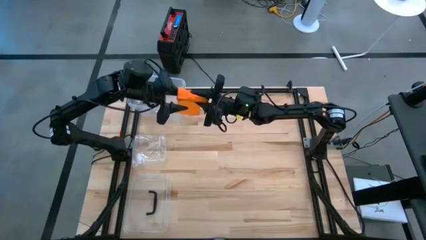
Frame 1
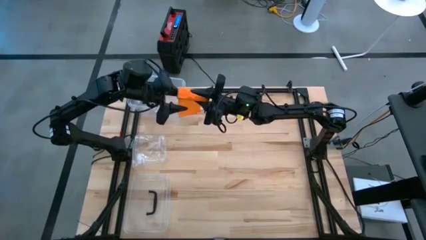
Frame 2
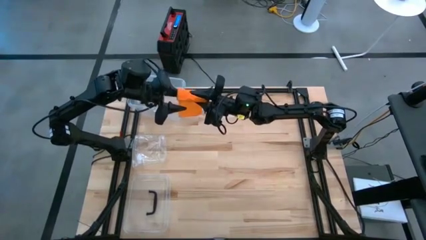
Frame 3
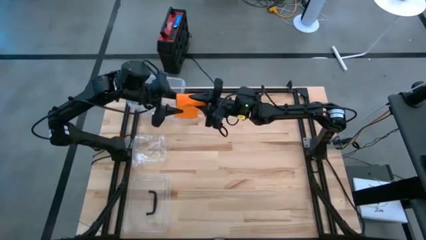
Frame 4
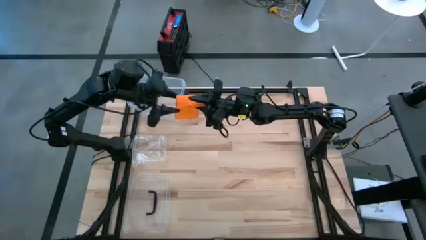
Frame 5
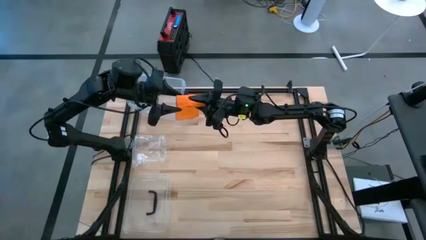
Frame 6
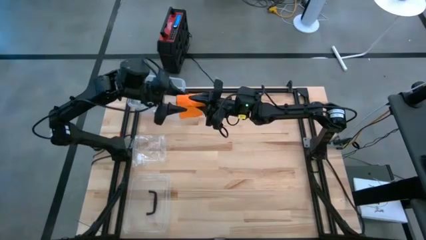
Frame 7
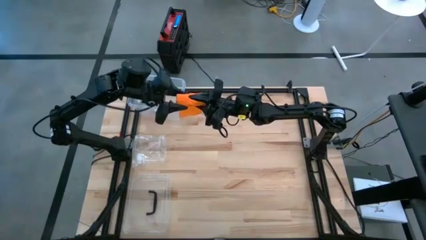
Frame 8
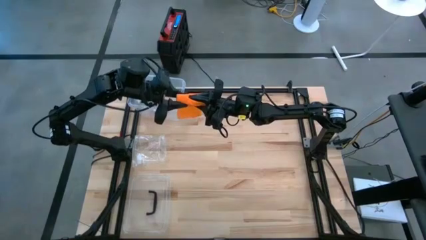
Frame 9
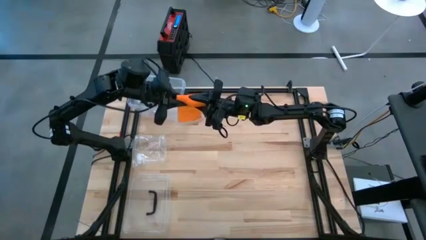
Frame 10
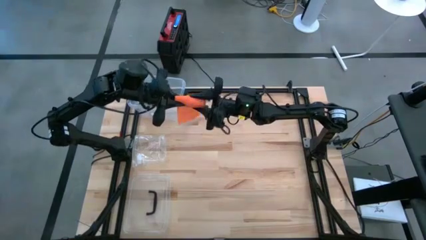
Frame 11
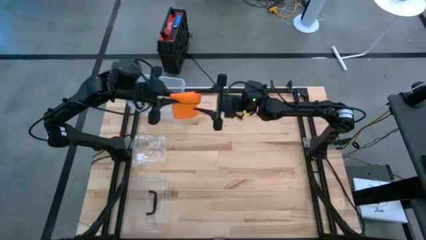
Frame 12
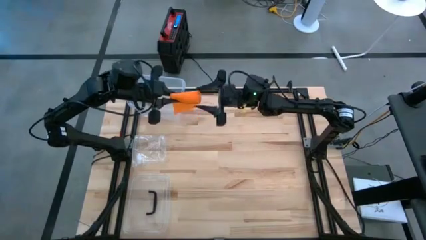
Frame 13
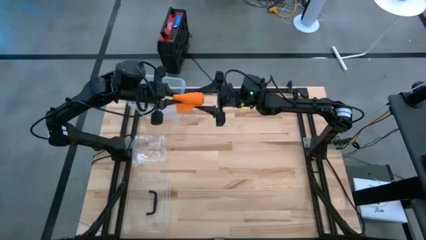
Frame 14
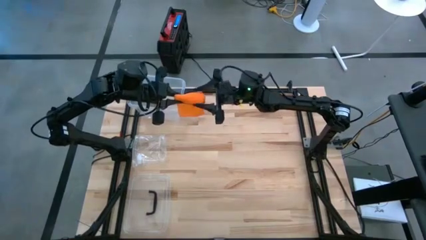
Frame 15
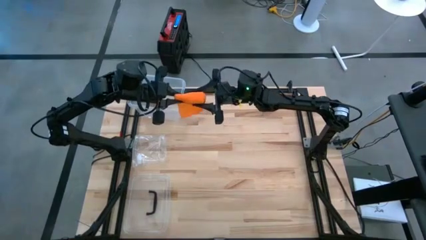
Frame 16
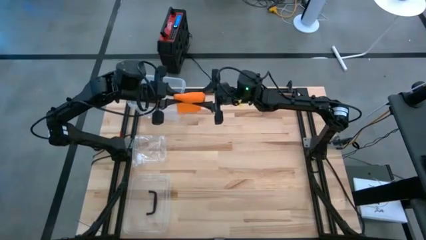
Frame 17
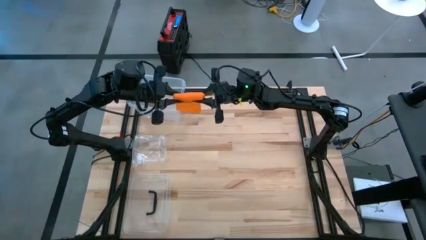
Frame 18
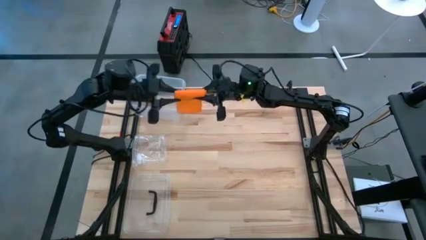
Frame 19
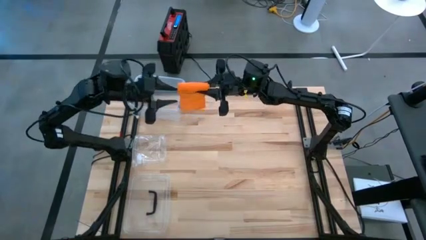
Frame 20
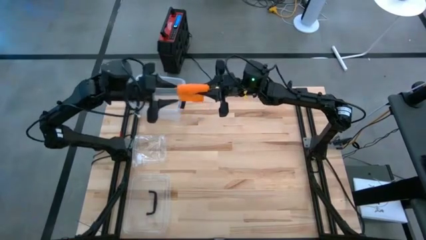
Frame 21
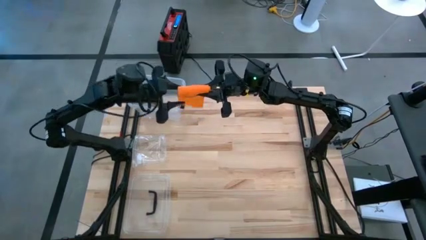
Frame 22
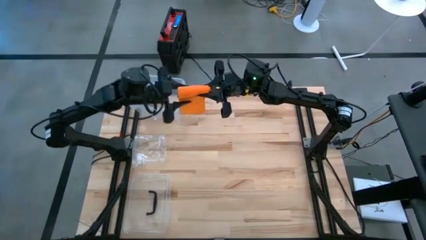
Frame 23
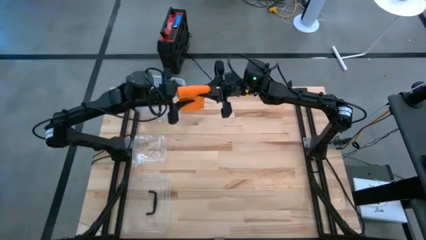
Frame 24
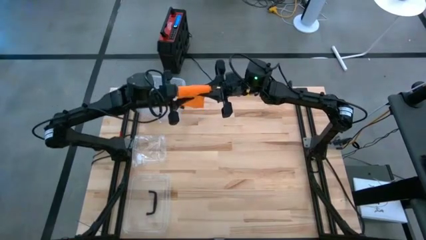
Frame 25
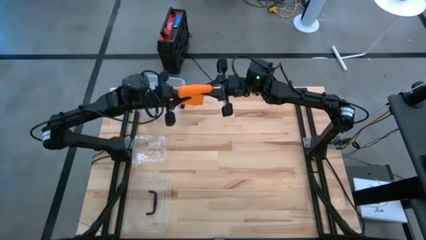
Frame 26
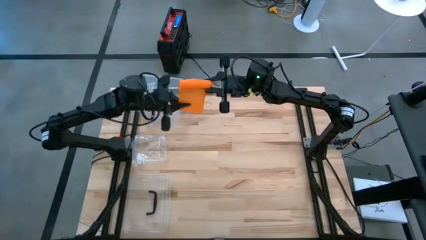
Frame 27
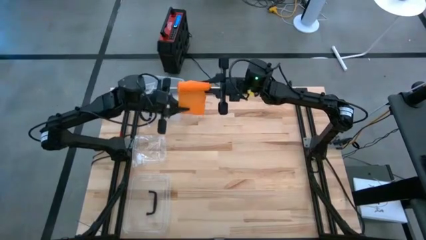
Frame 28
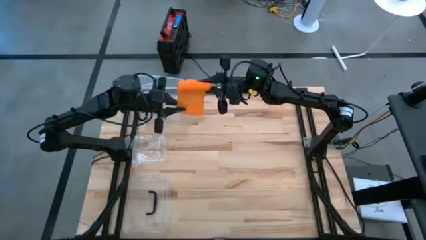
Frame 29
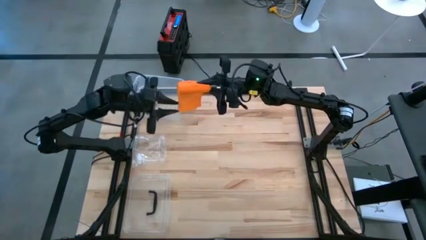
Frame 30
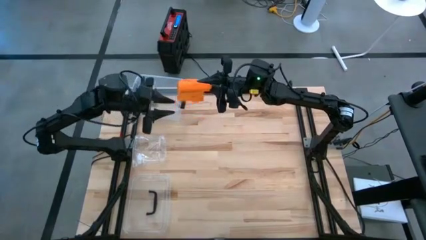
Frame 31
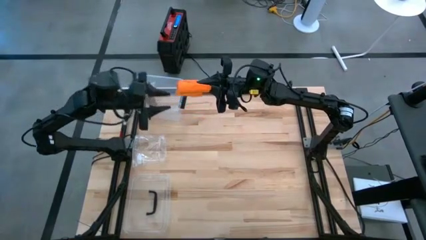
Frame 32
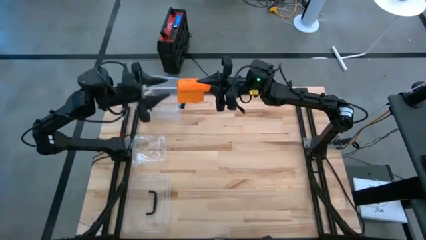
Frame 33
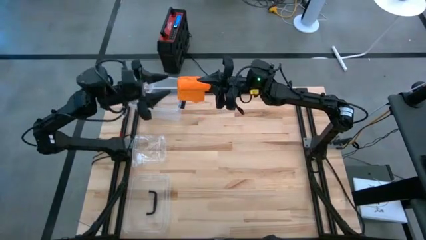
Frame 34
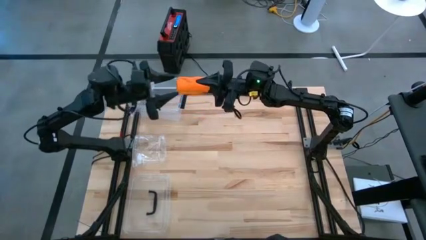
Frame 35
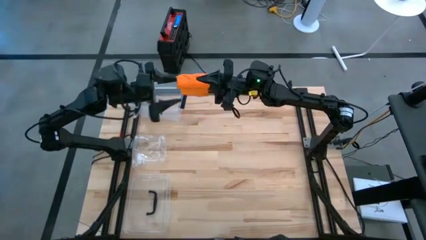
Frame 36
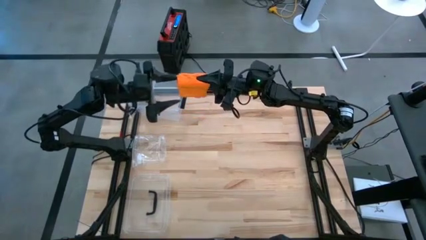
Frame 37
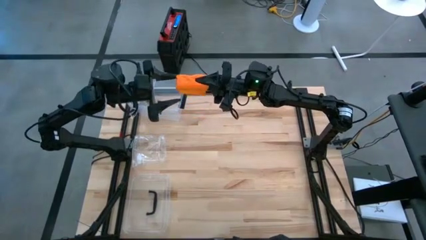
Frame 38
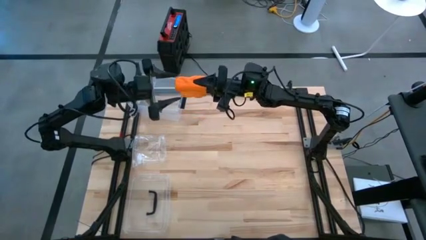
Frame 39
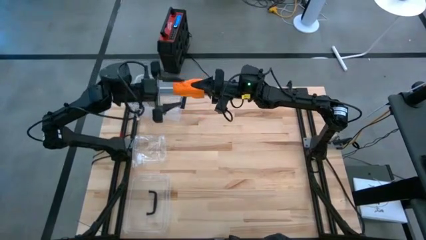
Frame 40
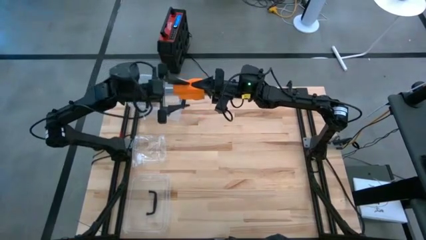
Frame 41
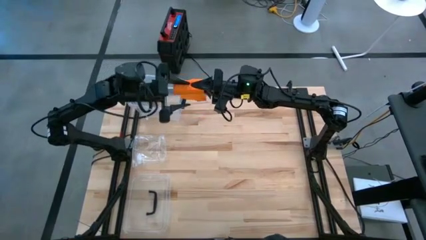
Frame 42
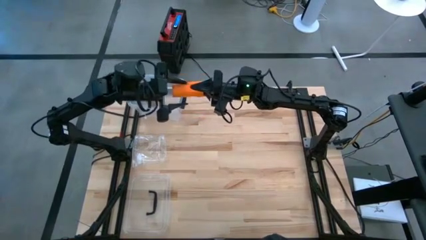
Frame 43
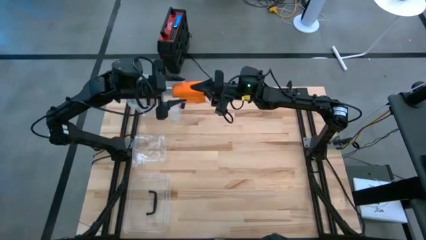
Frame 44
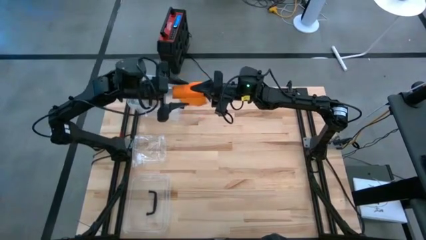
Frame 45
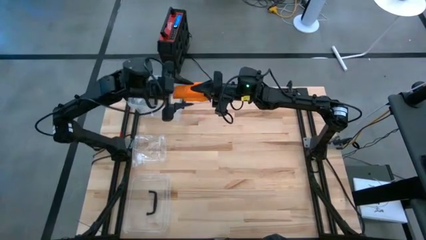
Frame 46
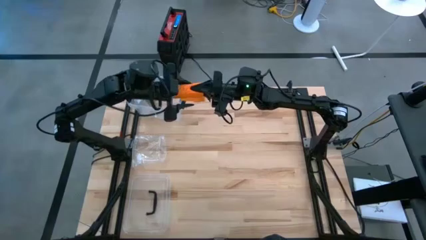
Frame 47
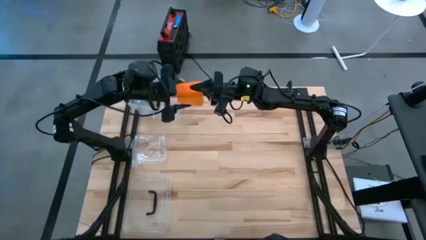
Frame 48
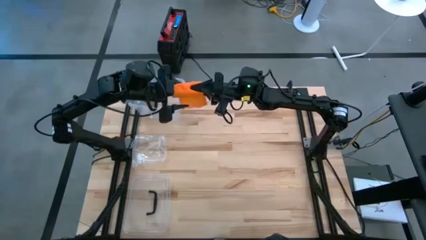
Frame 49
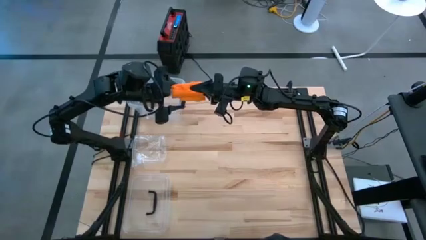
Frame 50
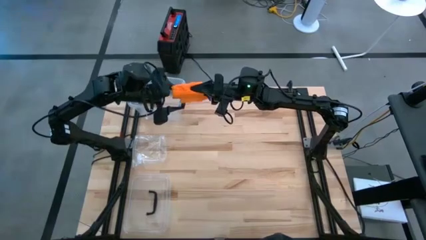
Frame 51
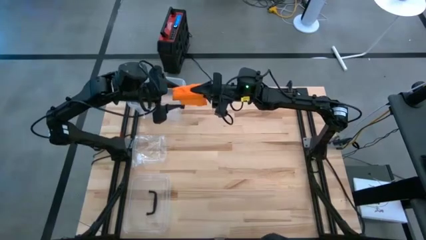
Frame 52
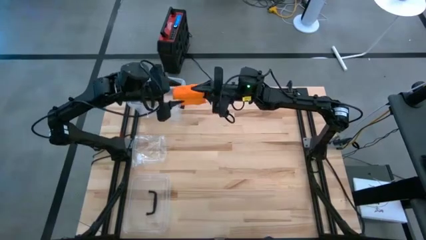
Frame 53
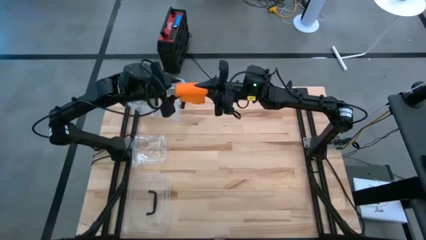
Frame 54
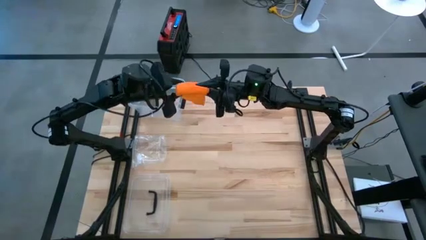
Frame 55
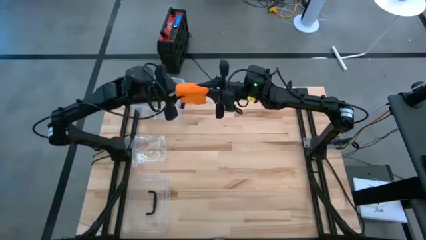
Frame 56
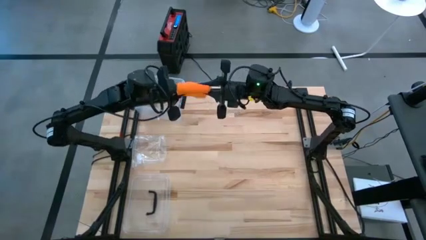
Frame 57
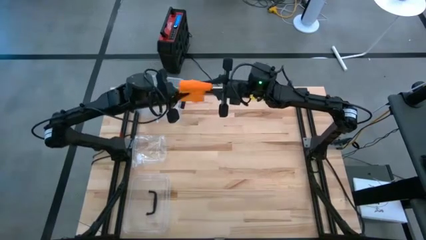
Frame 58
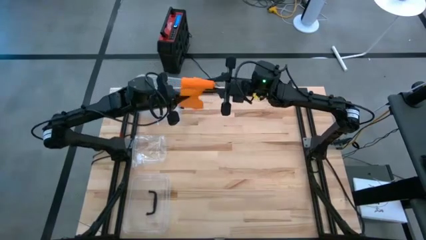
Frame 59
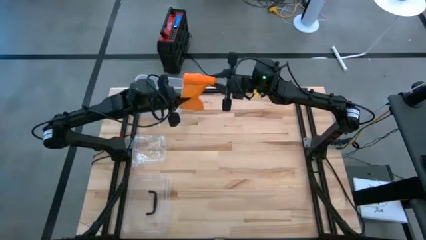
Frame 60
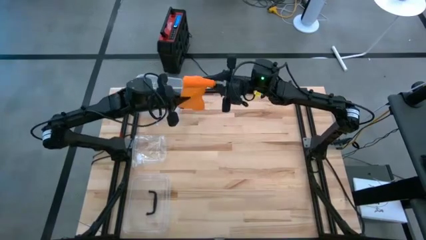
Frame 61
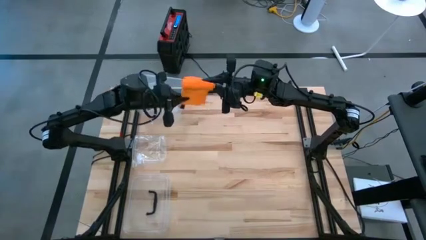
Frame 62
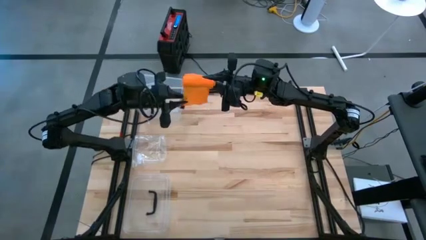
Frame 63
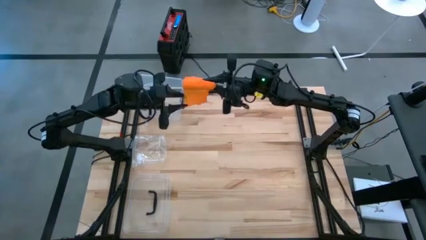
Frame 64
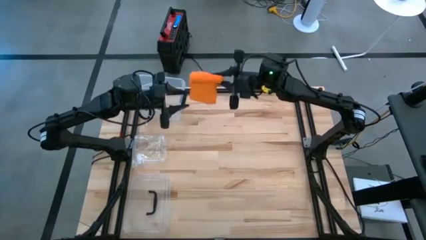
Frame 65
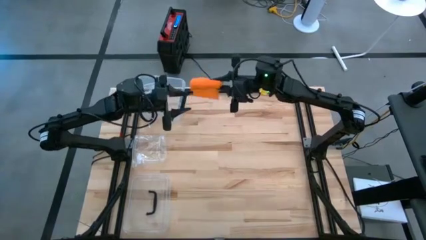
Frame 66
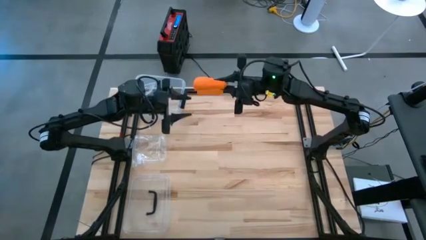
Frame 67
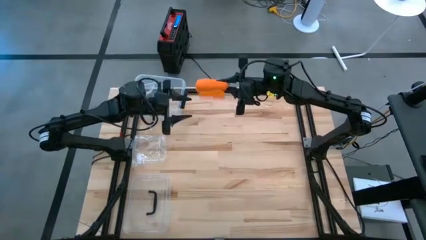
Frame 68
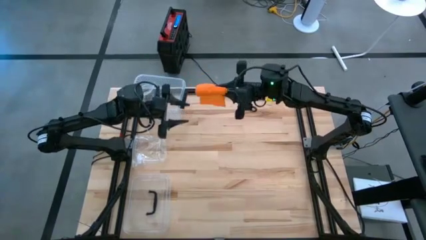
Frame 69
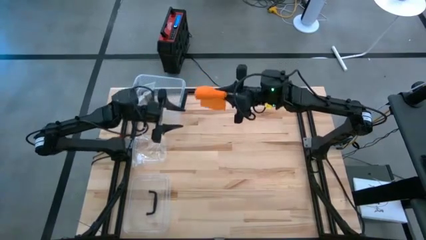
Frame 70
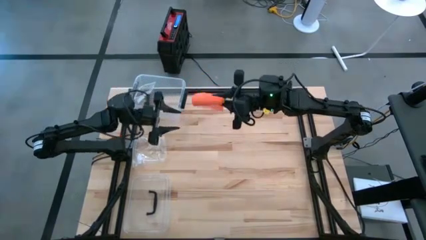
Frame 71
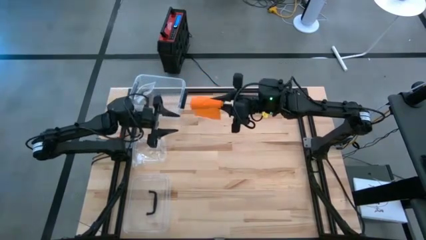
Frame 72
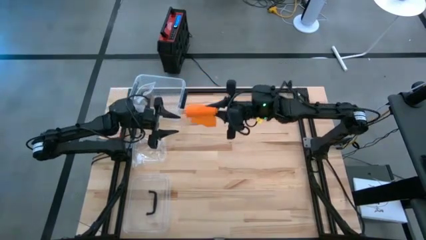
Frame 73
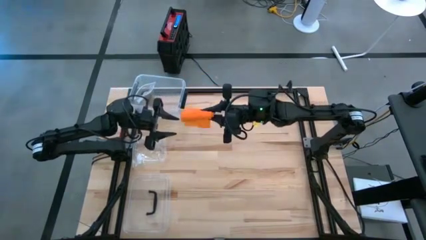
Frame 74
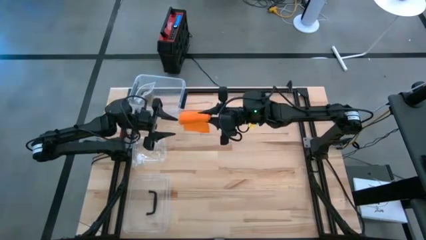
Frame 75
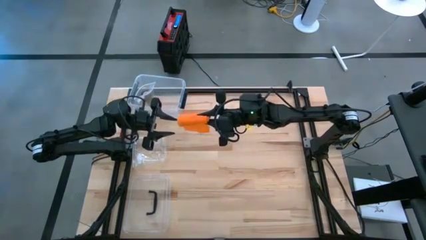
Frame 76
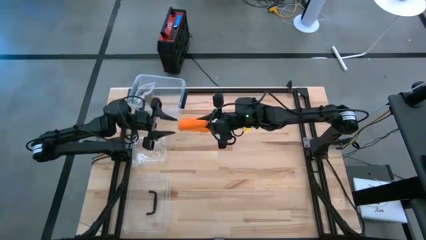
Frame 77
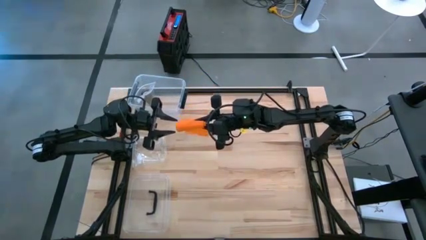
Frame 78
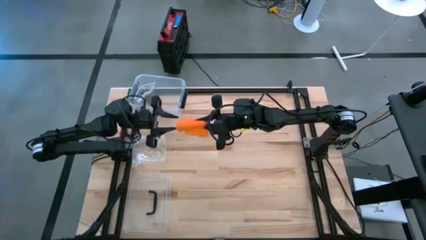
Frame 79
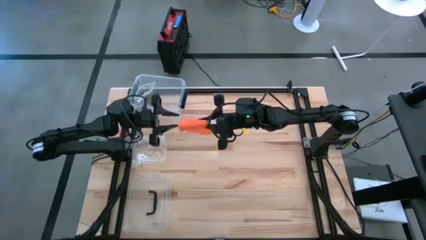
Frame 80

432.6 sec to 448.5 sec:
Task: Roll bandage
Roll the orange bandage
